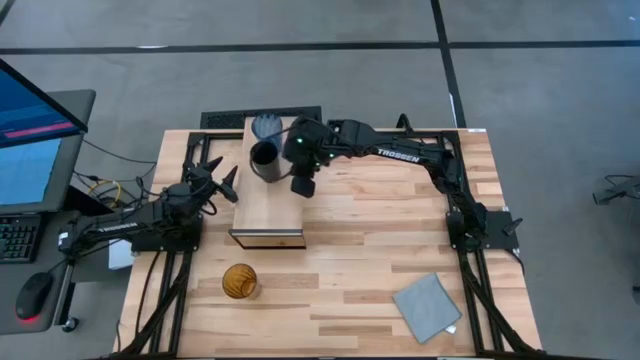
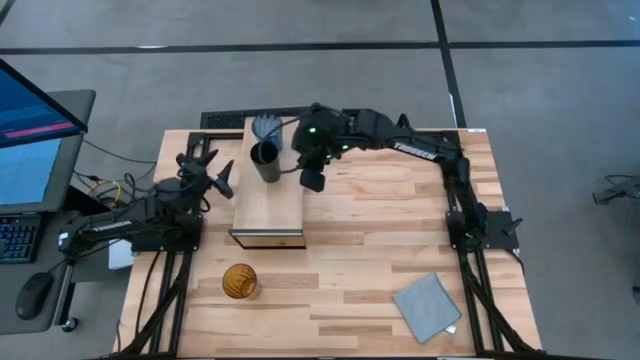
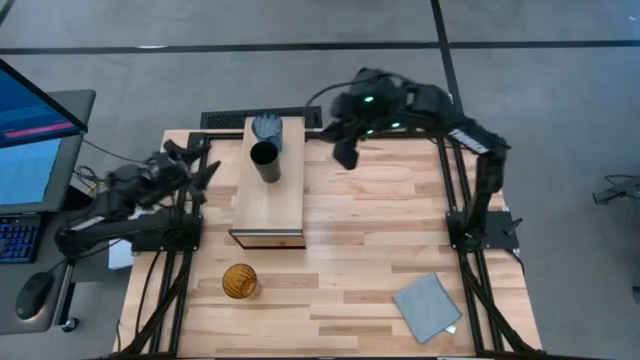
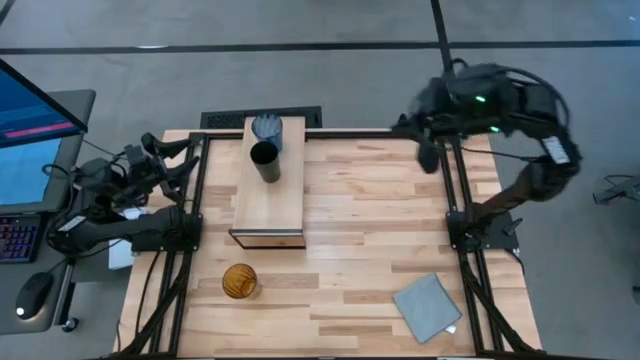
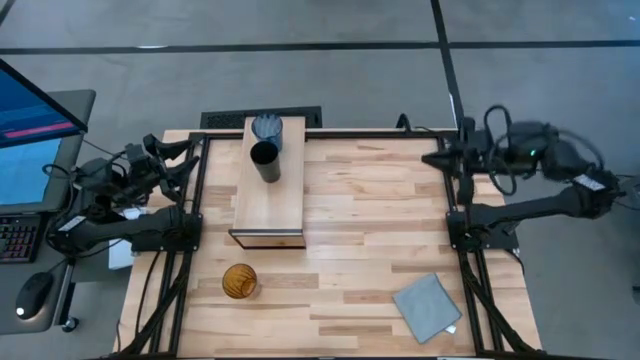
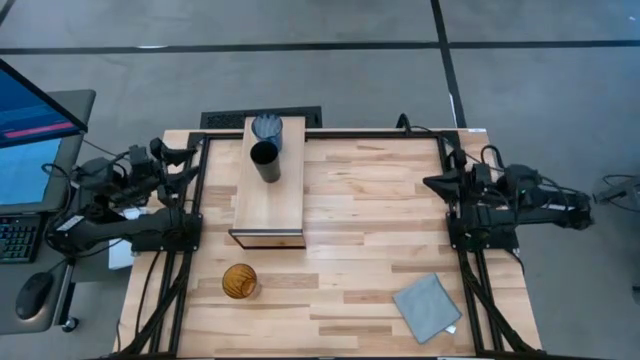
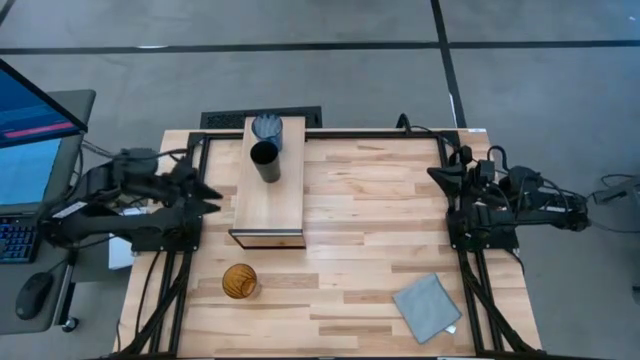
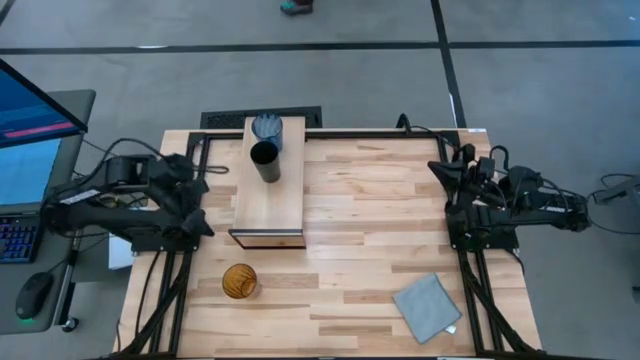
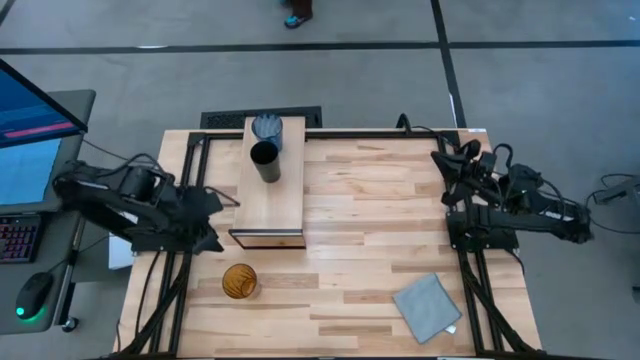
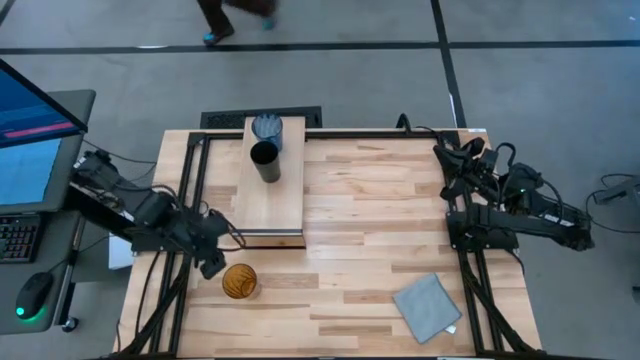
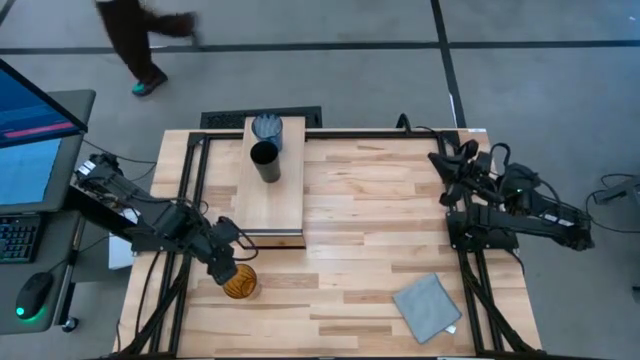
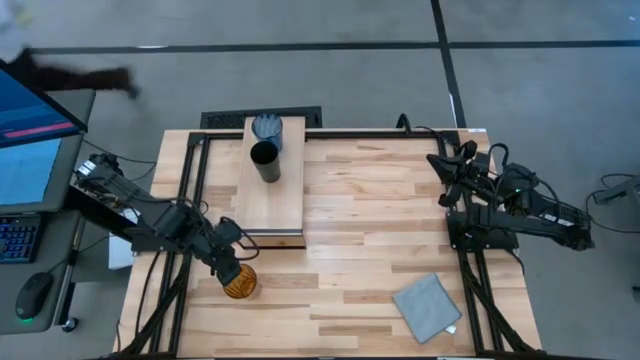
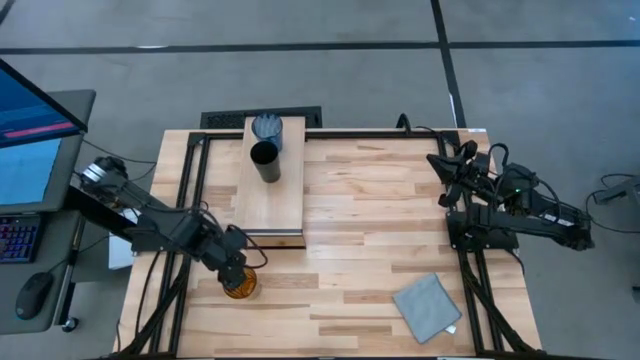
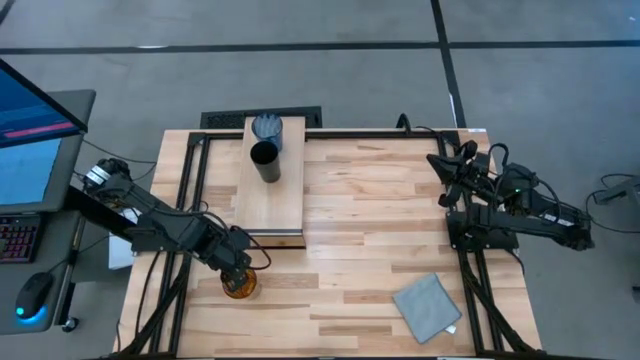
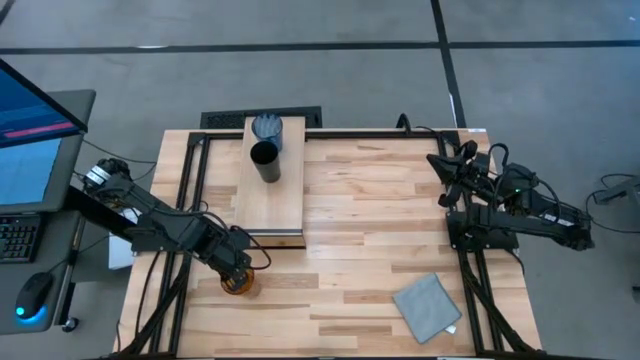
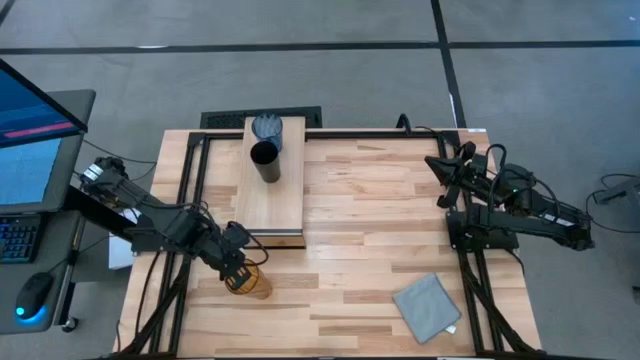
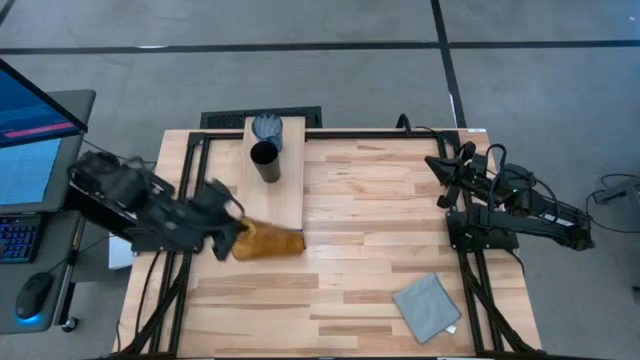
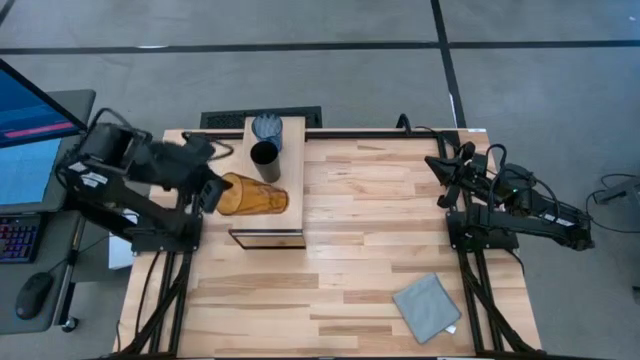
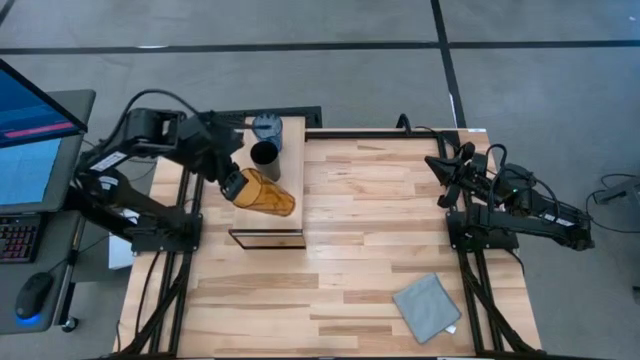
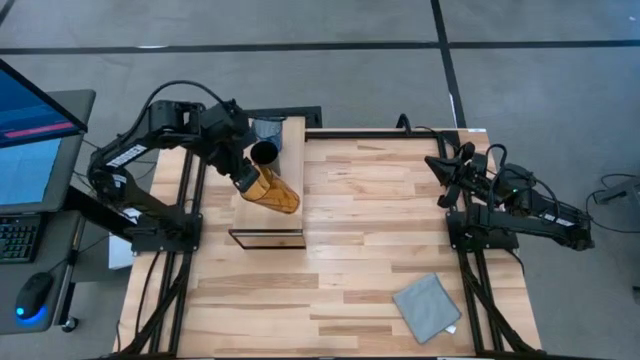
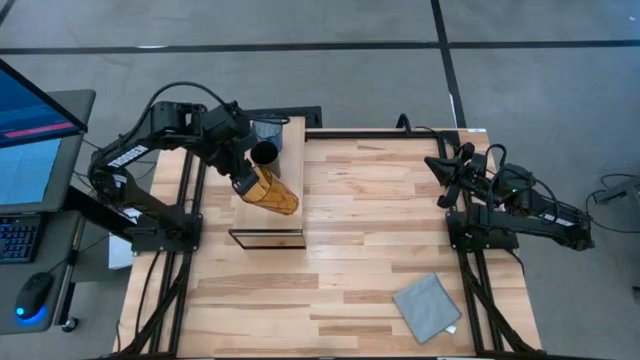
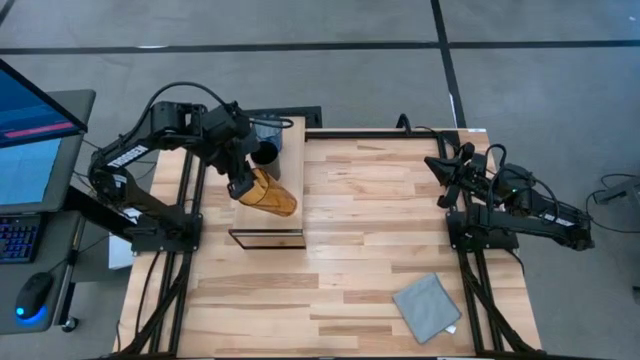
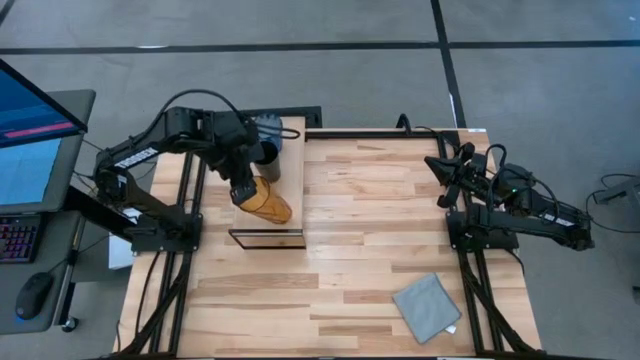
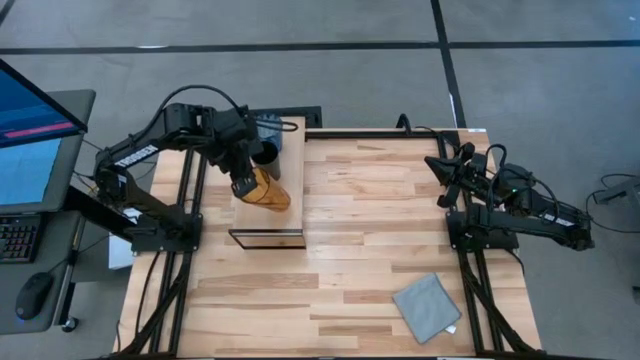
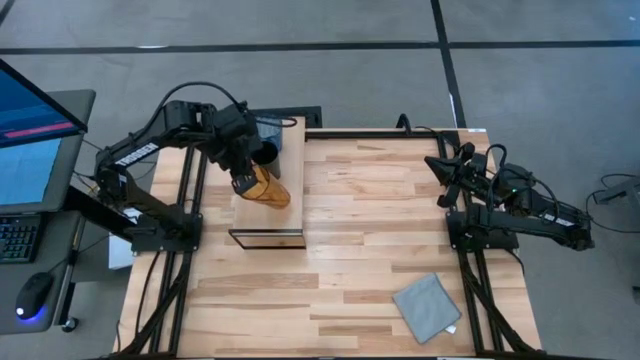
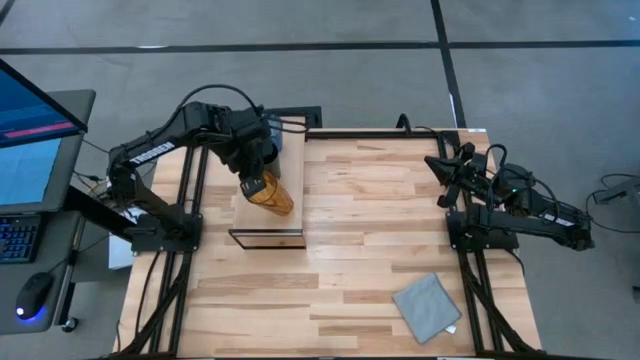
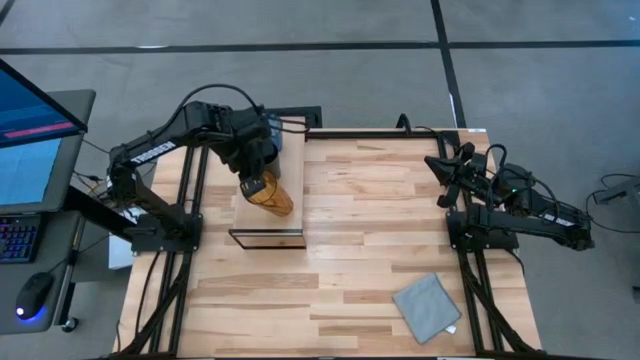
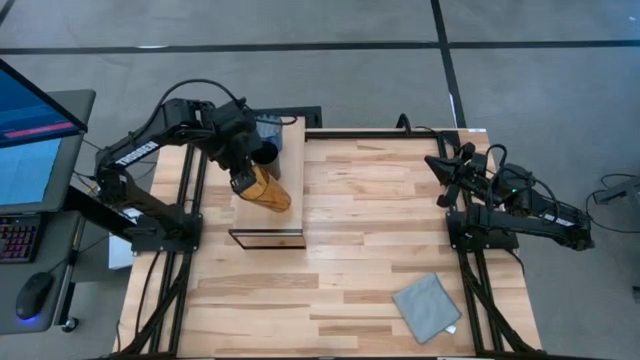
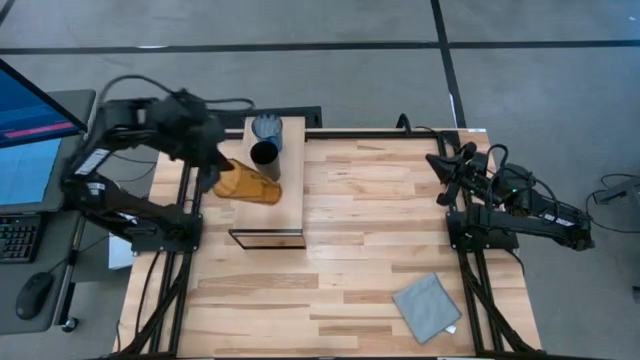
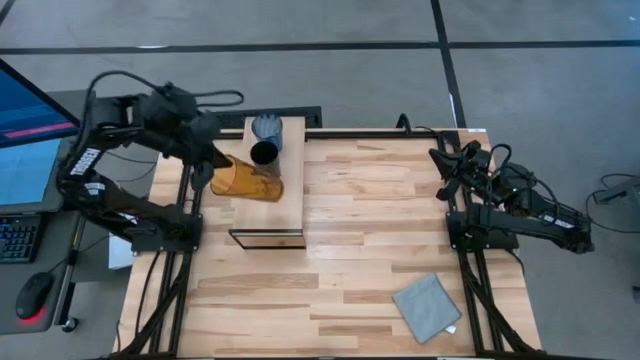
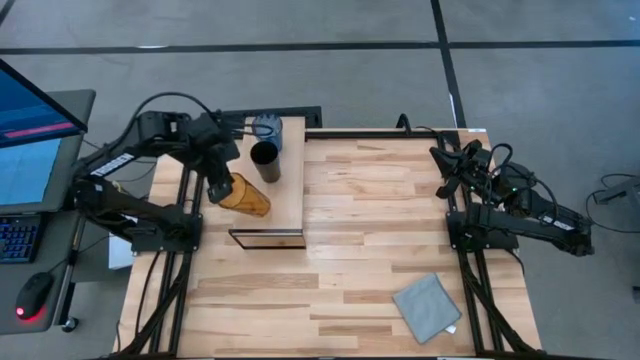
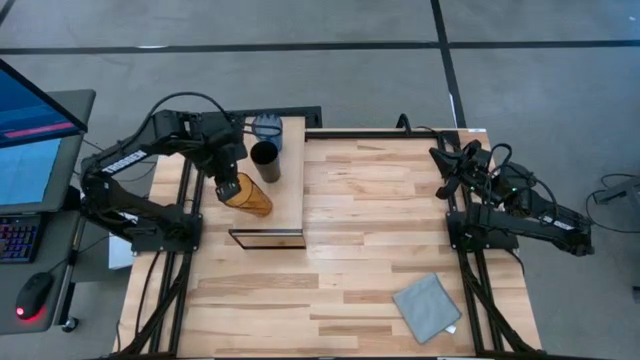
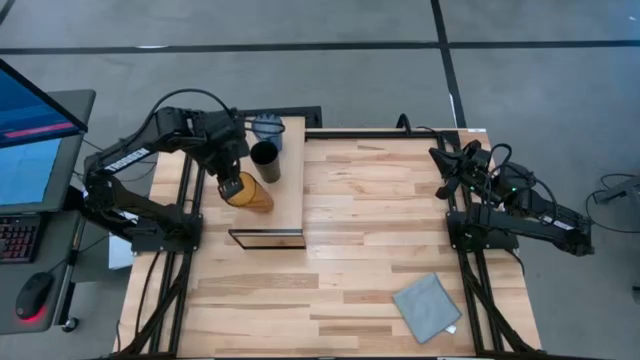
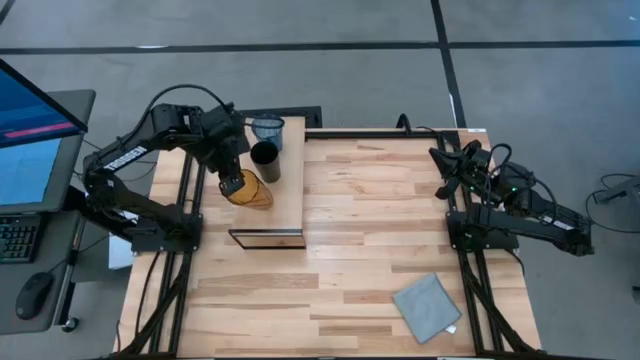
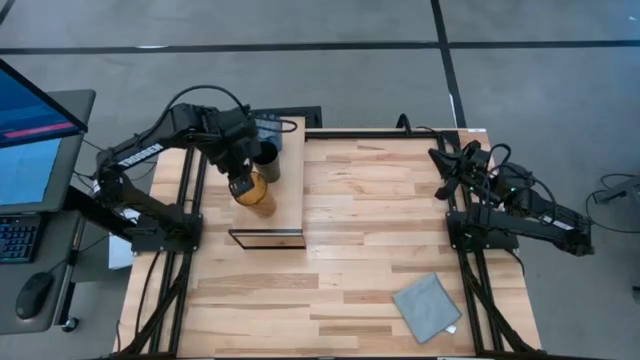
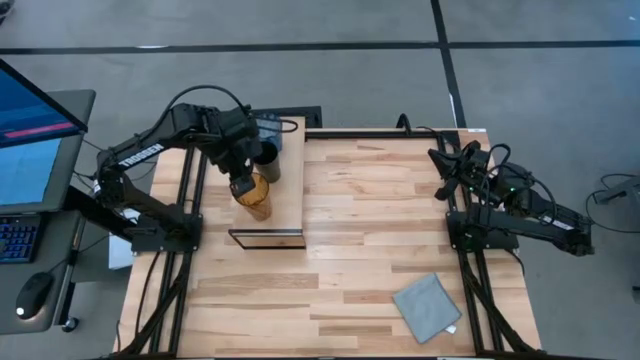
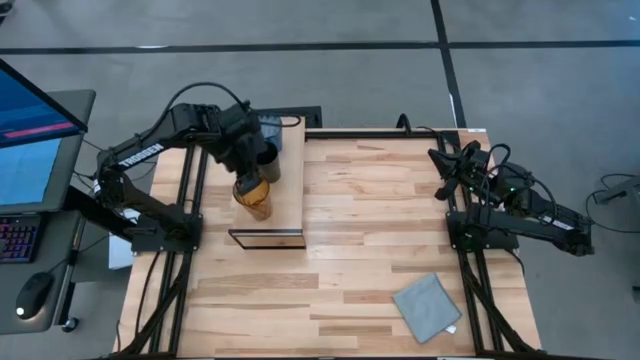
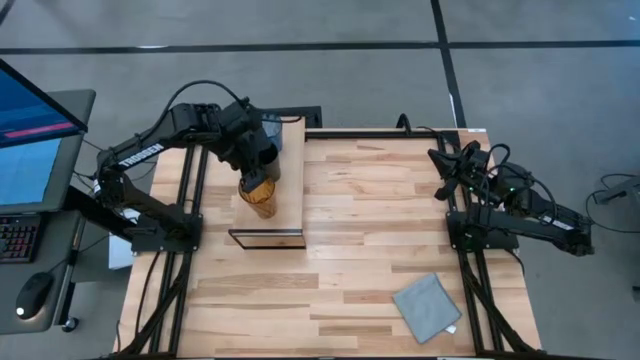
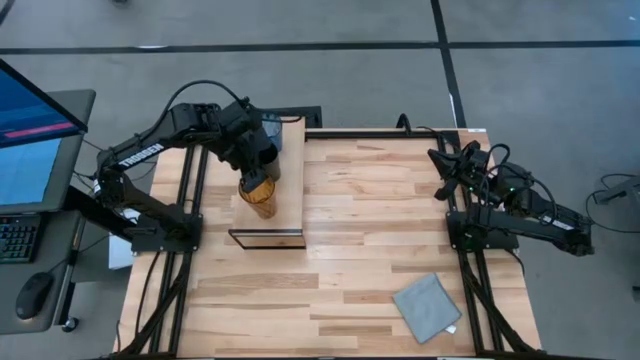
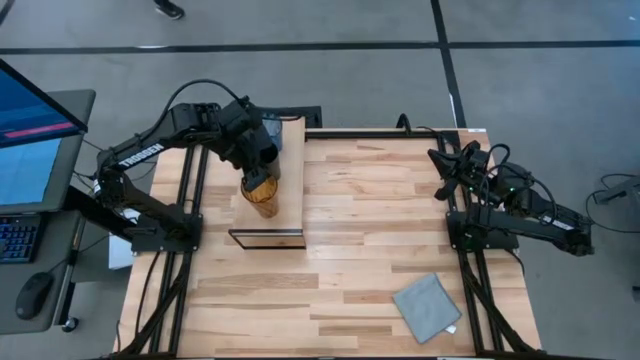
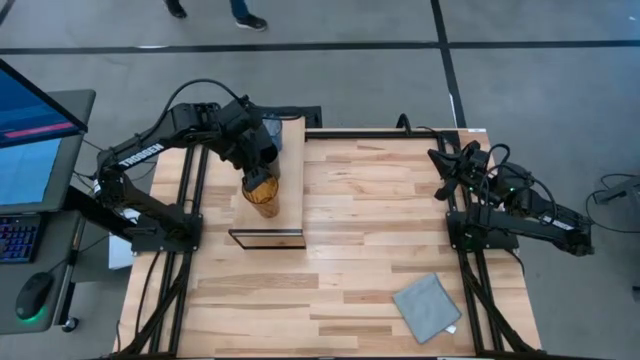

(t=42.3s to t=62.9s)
Task: Stack small to large cups/mugs on shelf
Put the brown cup on the shelf
